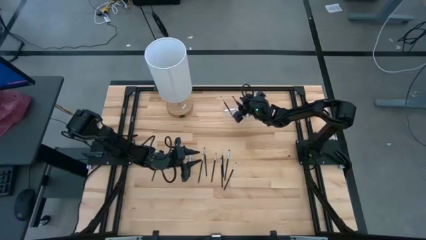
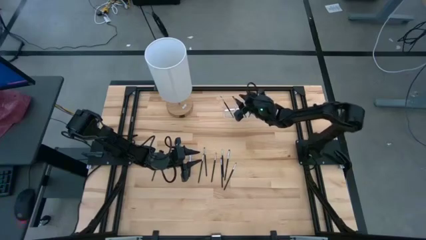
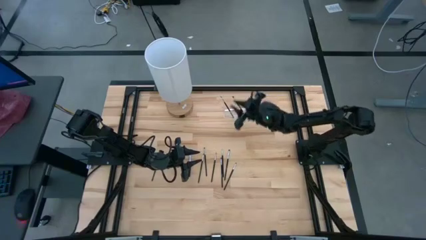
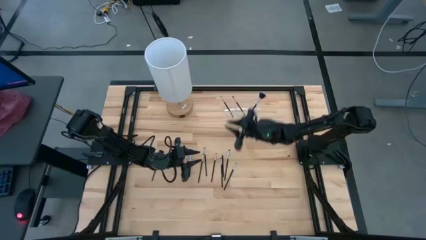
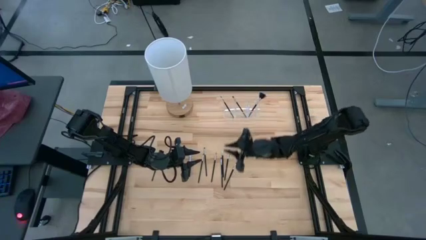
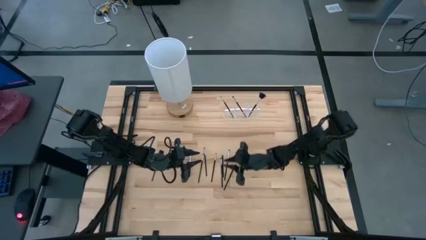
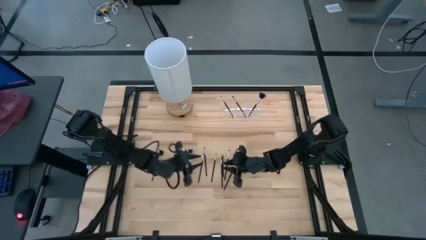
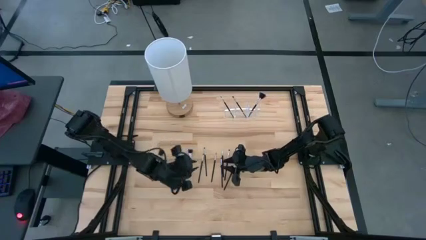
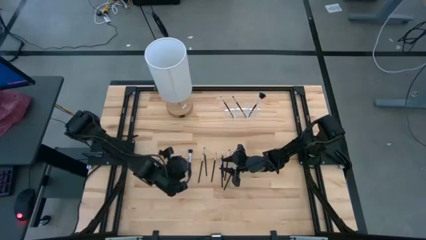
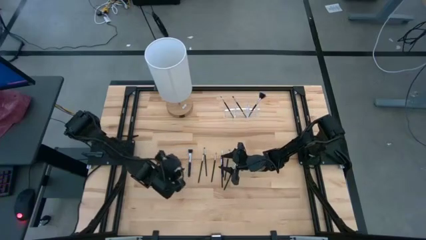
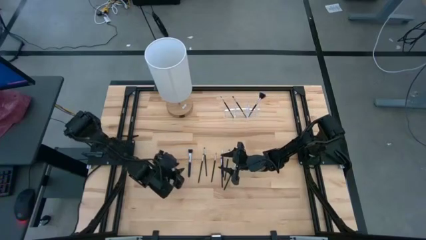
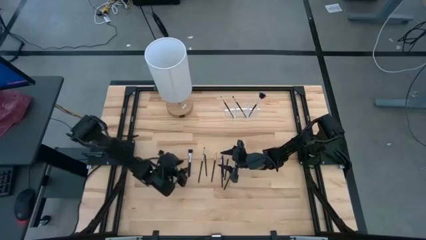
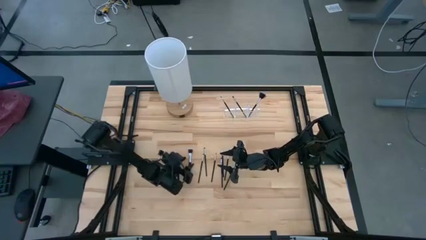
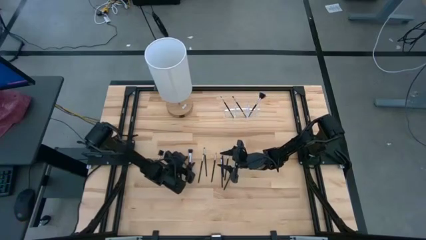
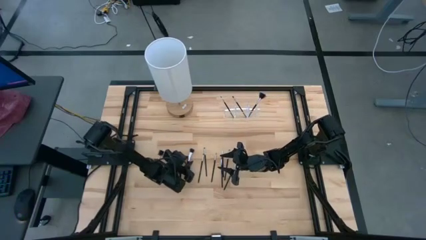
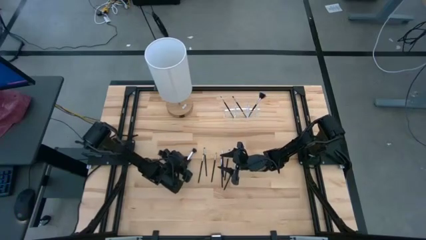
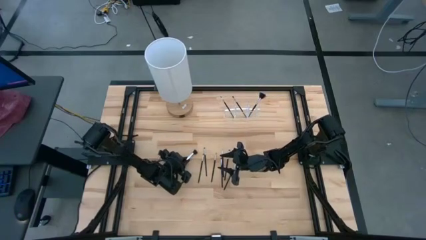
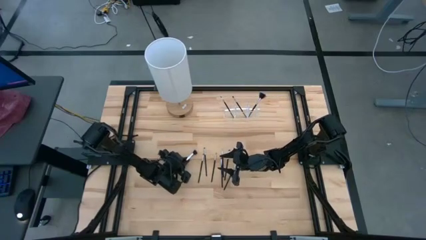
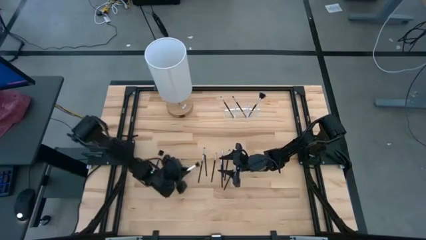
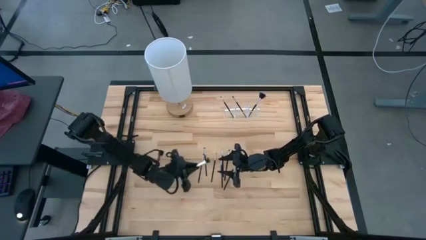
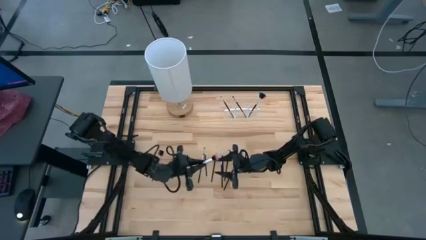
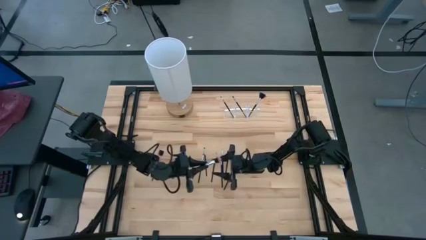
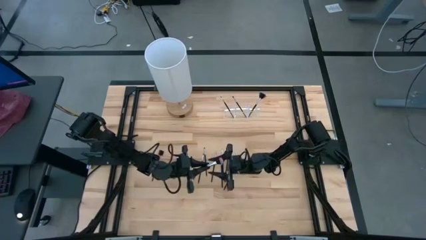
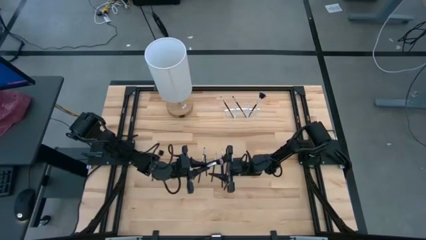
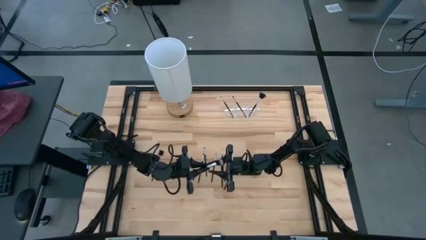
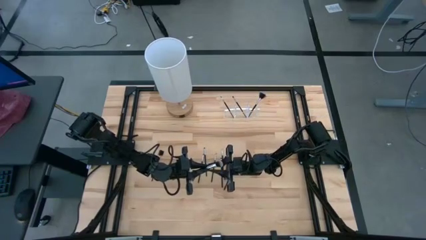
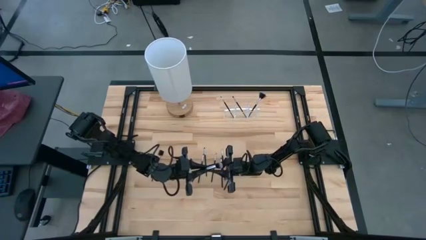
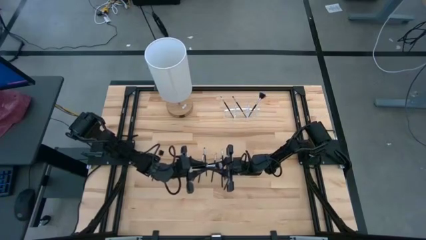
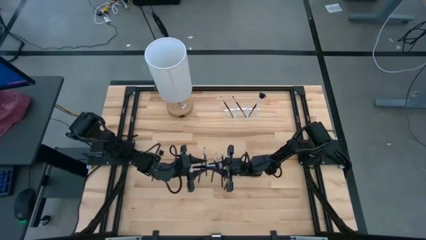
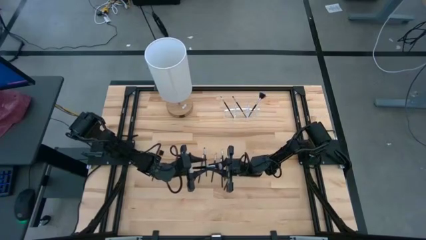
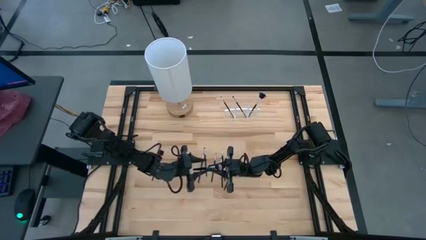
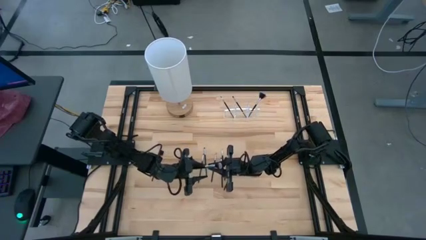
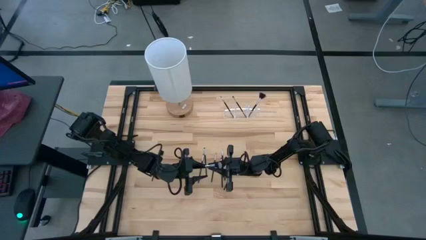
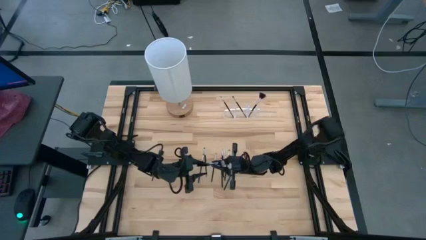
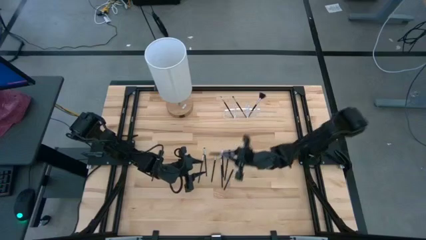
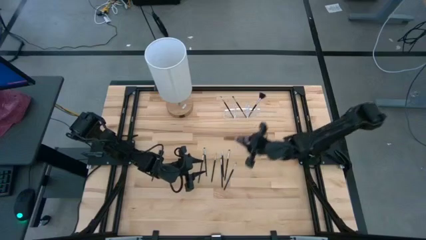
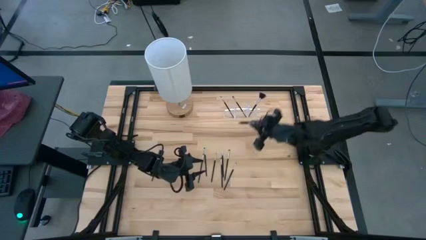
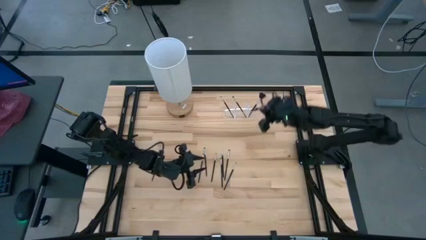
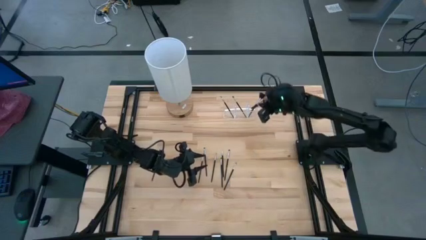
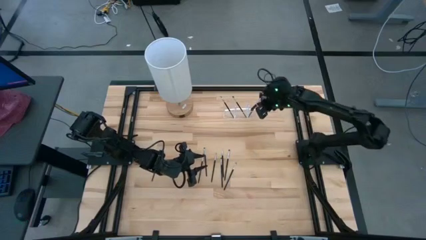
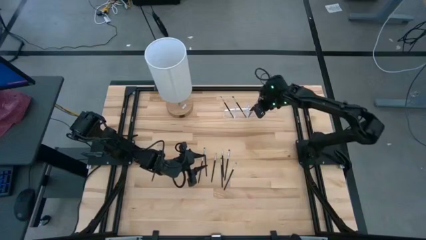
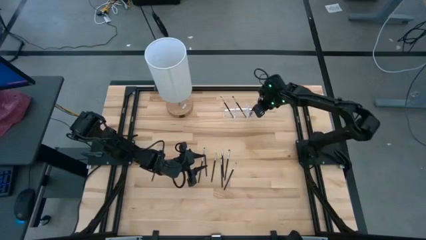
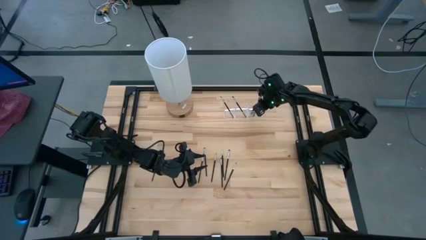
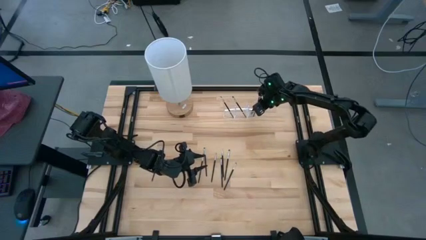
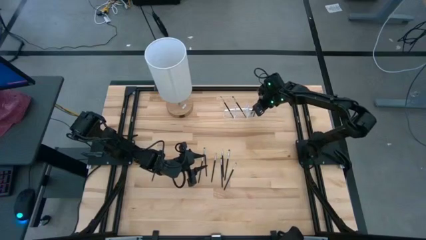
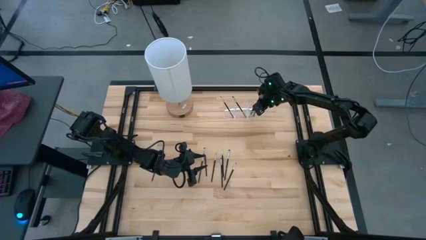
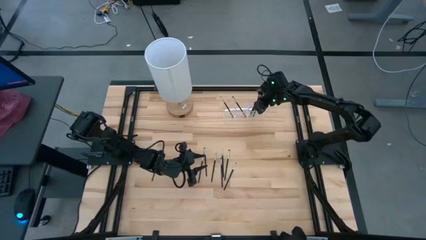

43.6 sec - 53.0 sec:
Task: Sort items
Put the powder brush into the transparent organizer

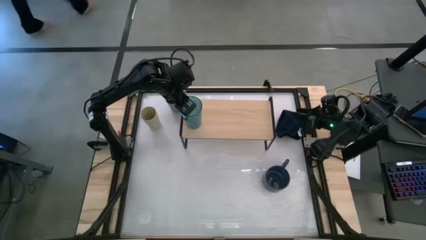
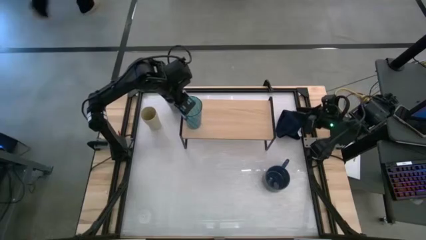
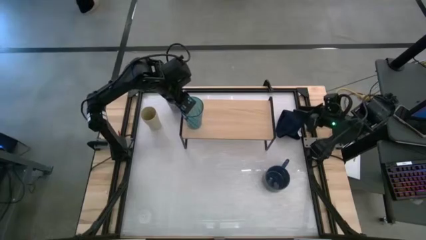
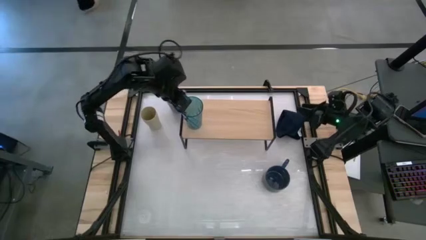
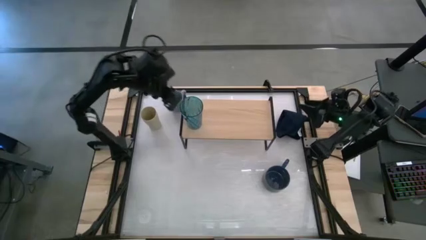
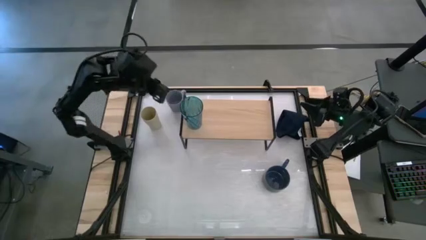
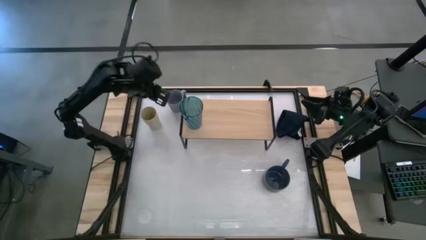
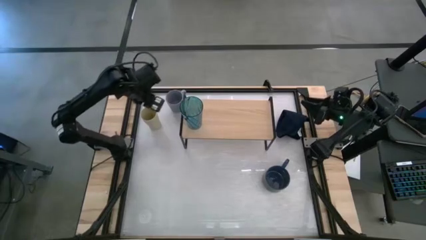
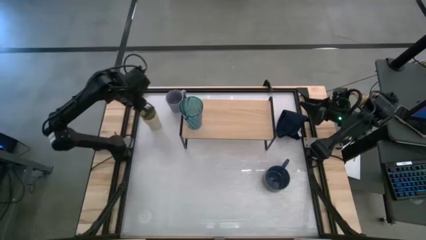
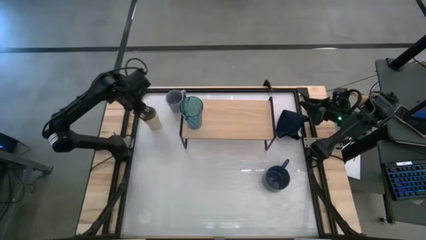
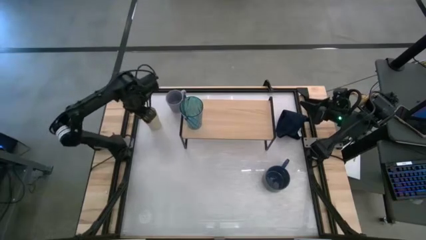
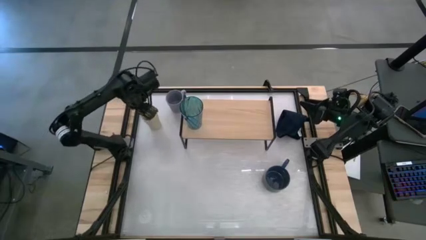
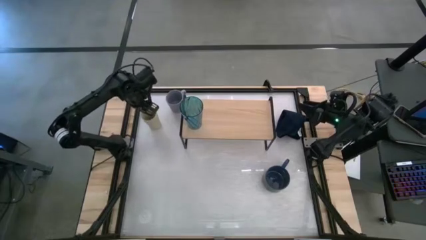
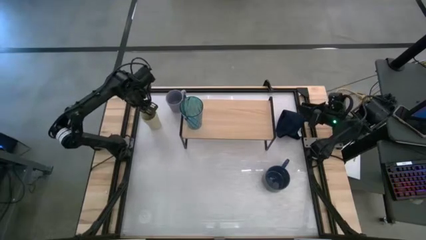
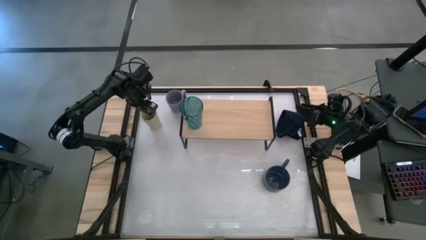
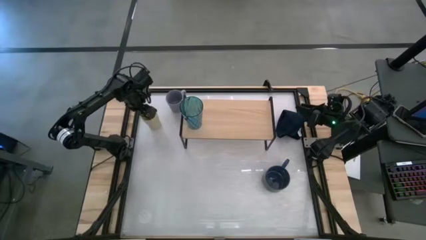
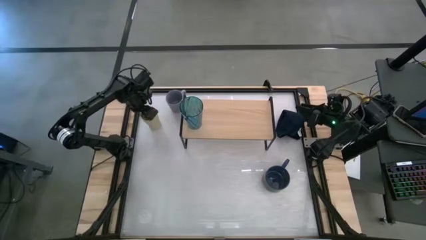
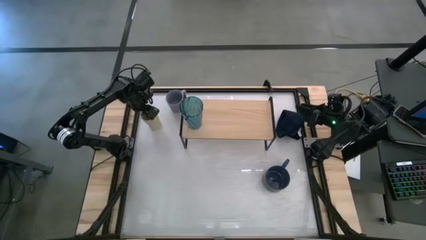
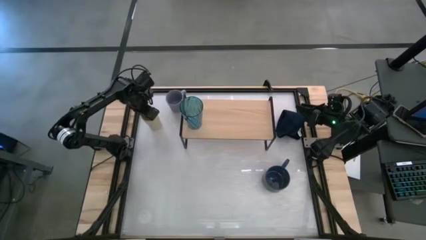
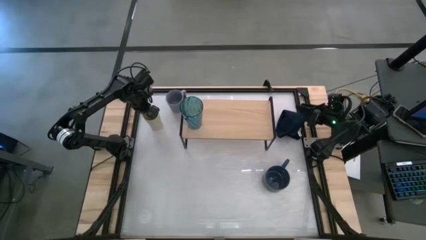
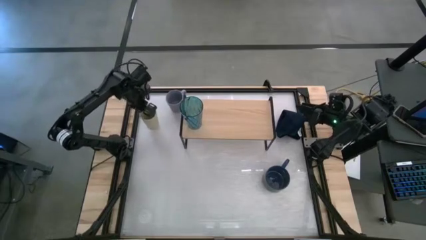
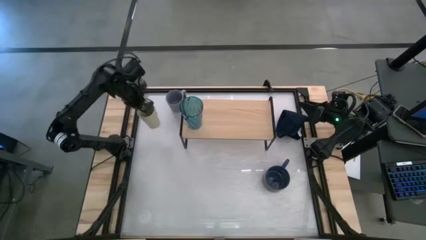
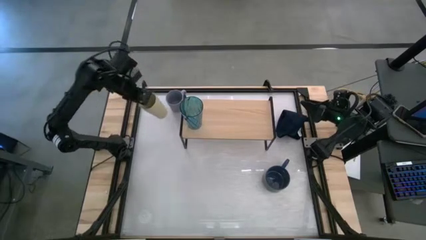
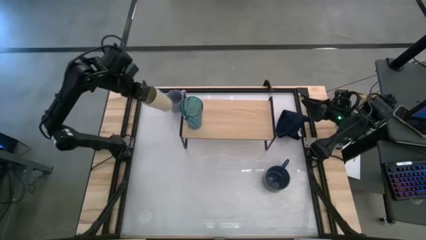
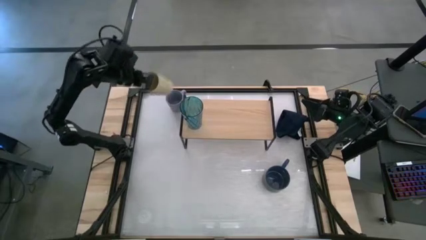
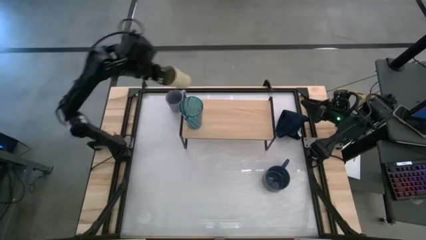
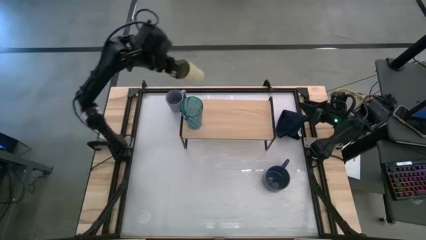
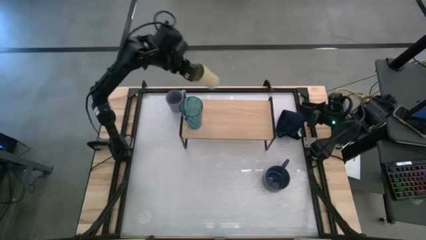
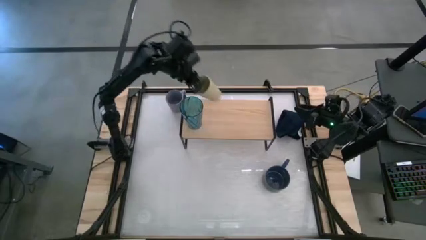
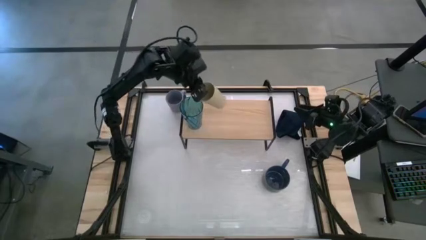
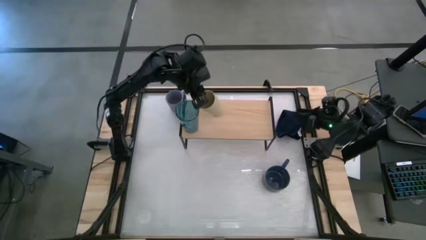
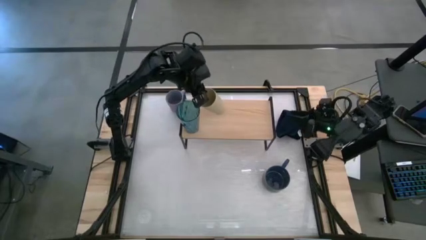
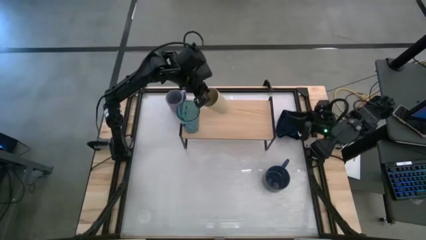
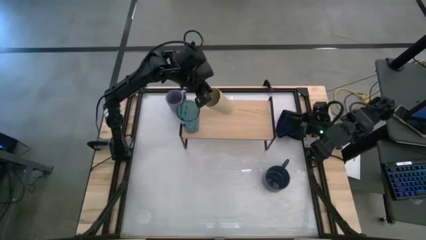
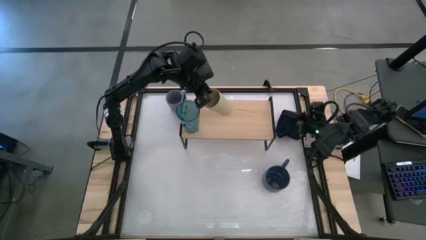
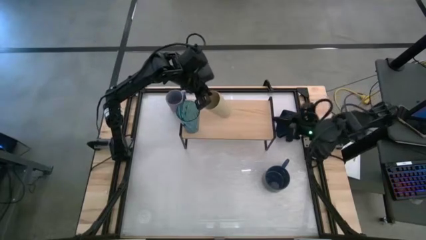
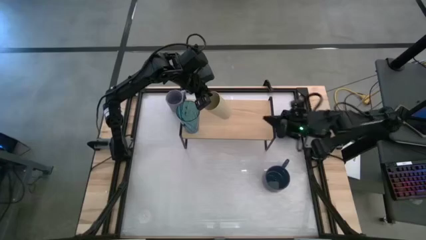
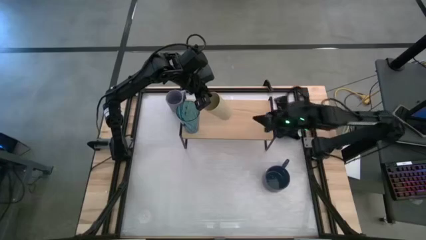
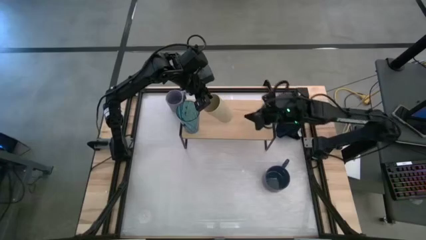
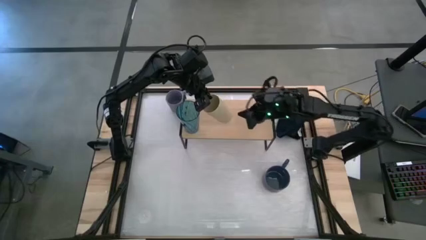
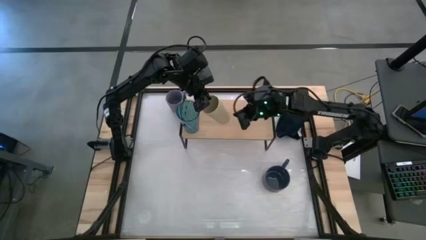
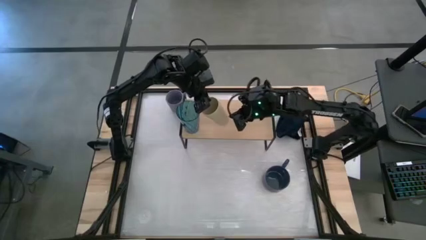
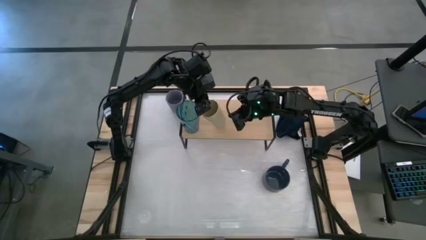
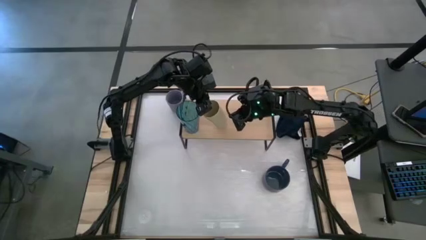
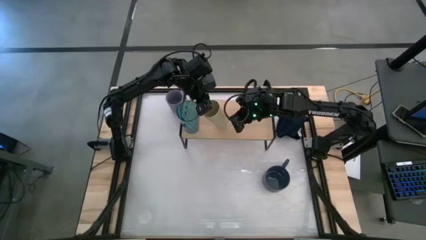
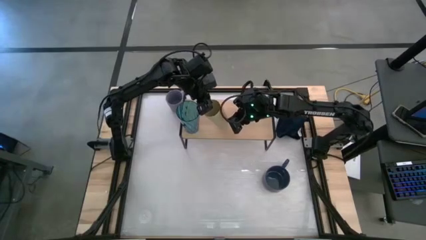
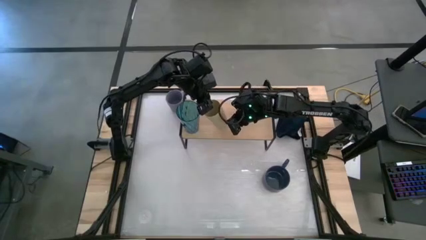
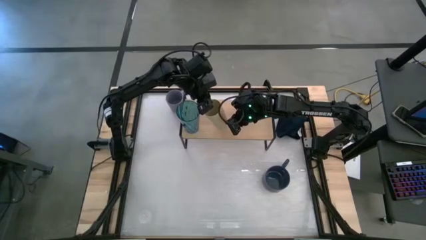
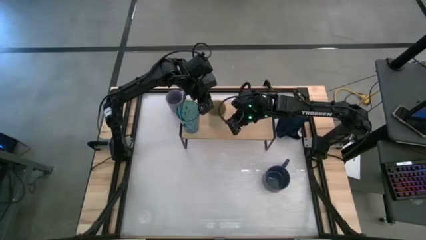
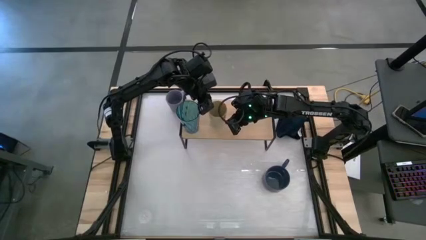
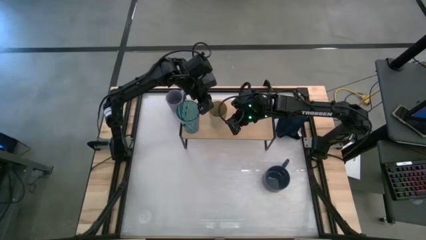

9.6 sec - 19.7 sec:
Task: Stack small to large cups/mugs on shelf
Put the brown cup on the shelf
